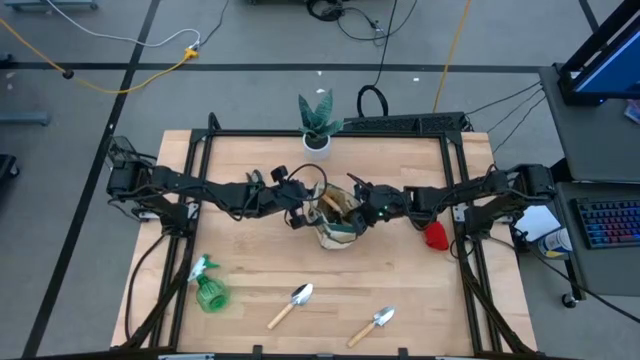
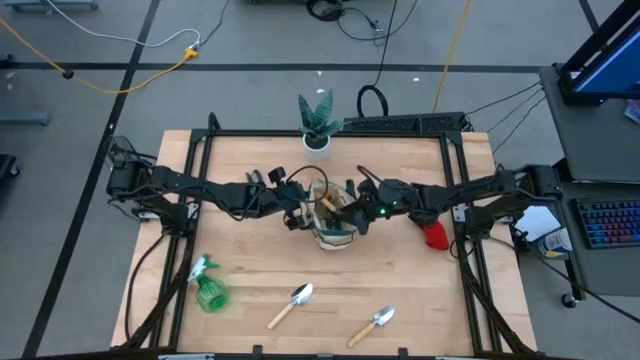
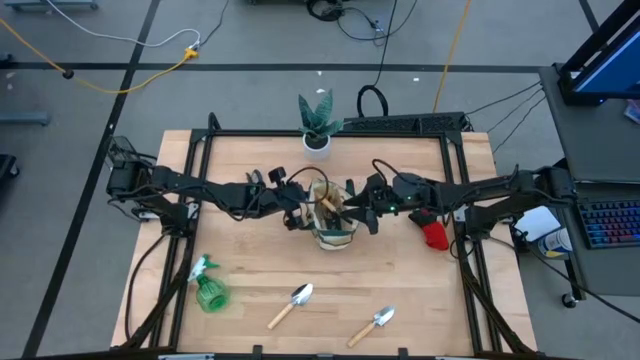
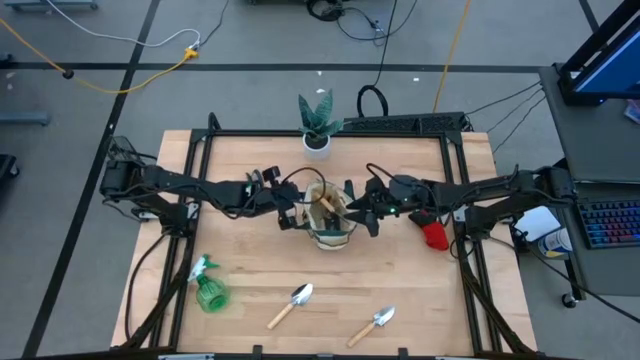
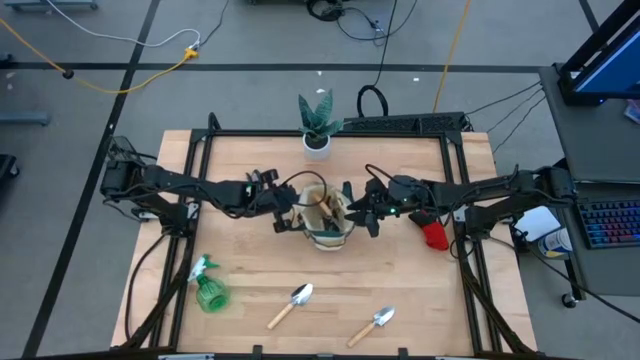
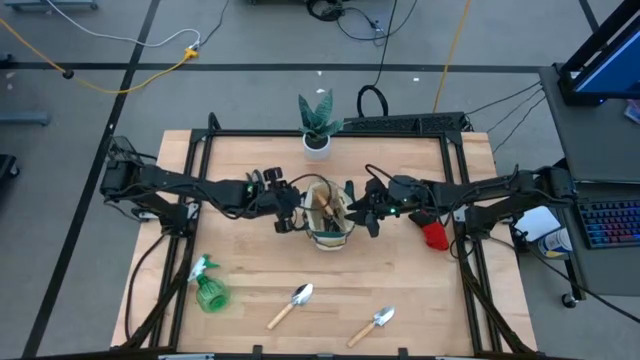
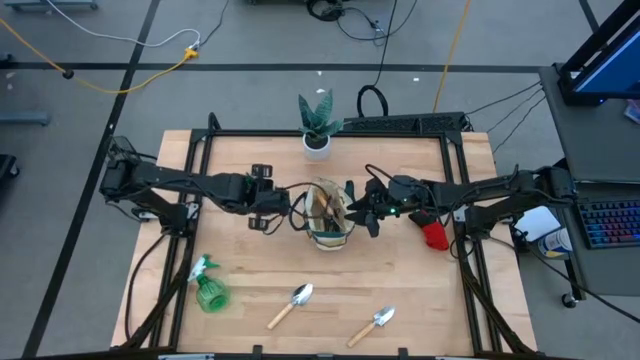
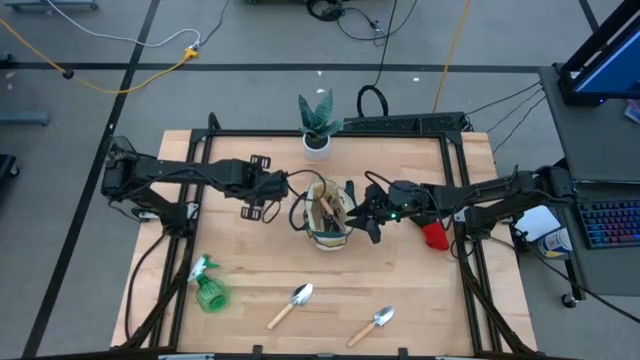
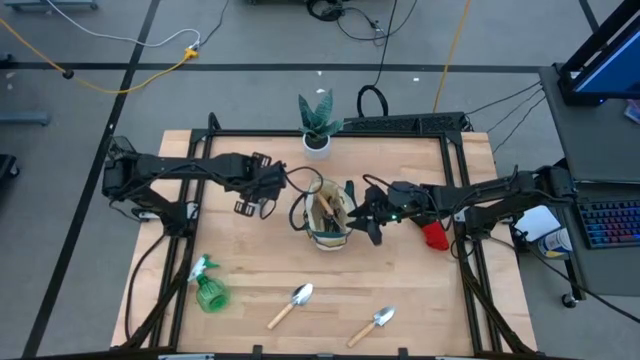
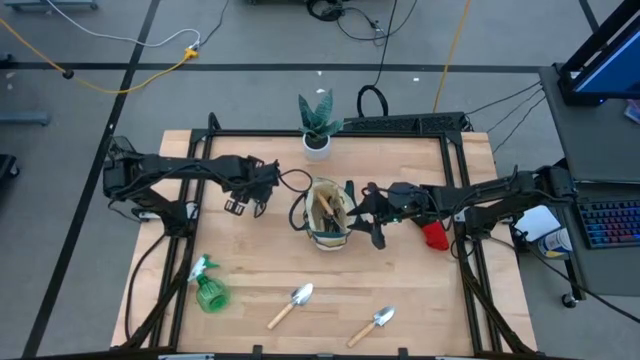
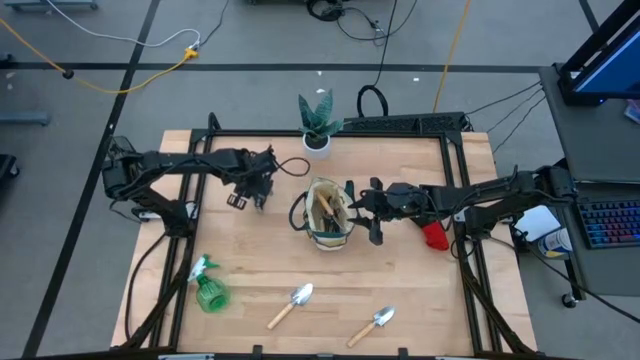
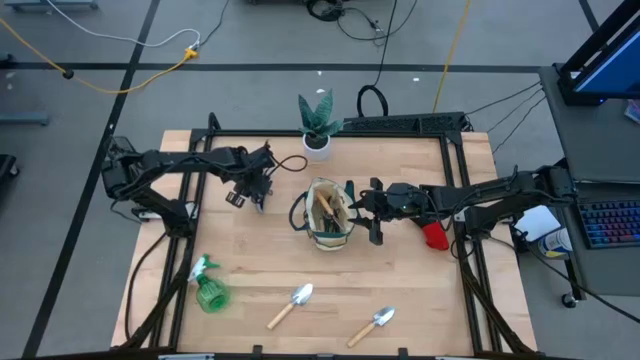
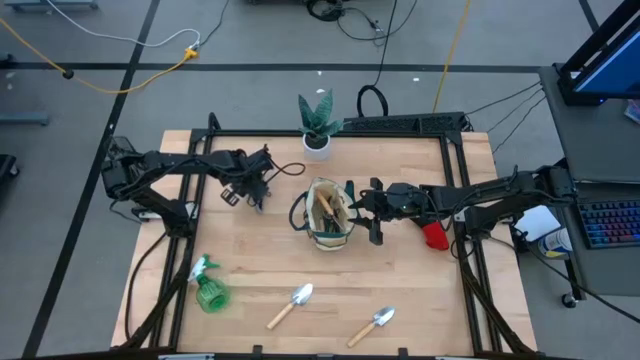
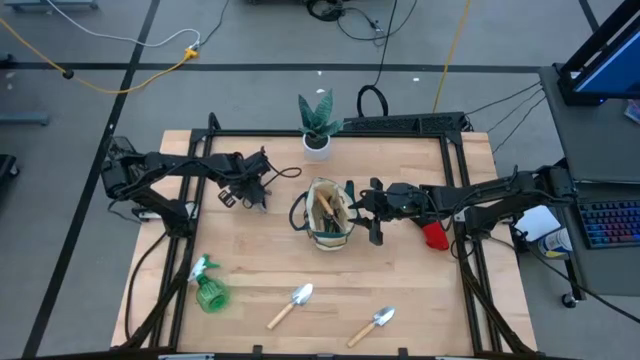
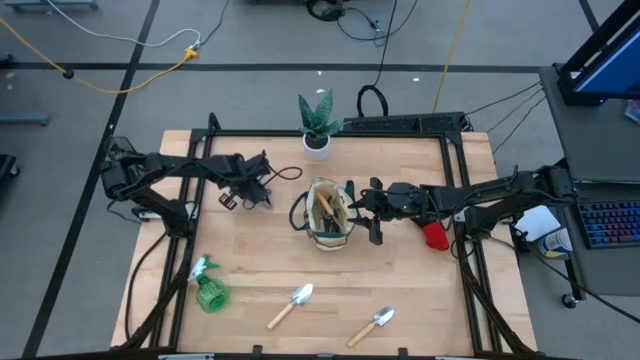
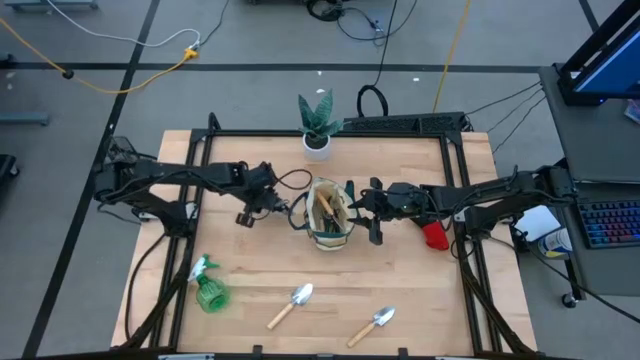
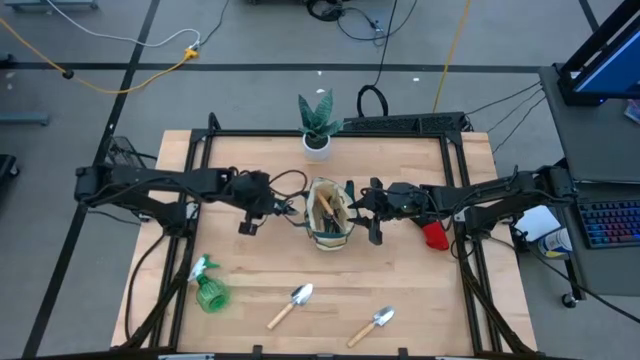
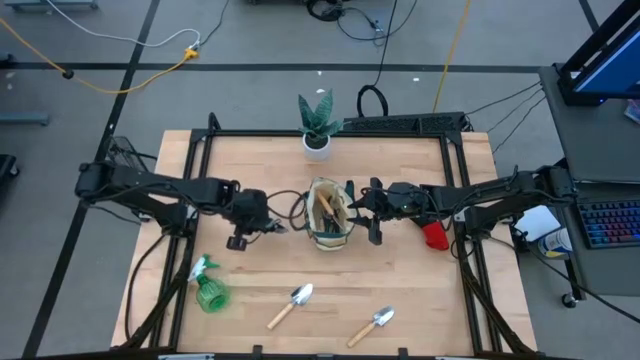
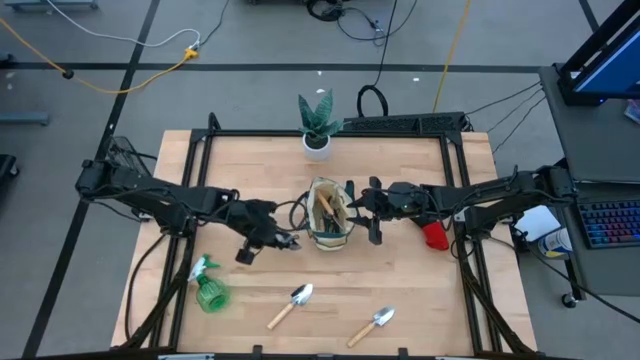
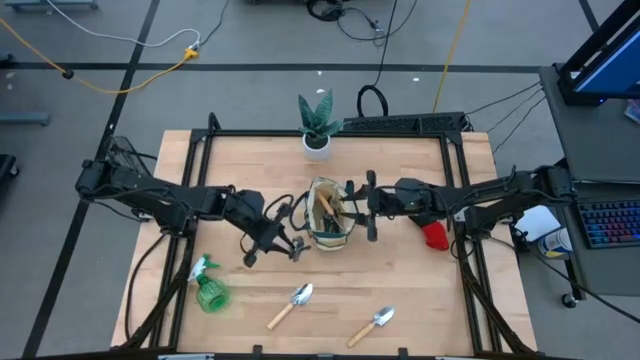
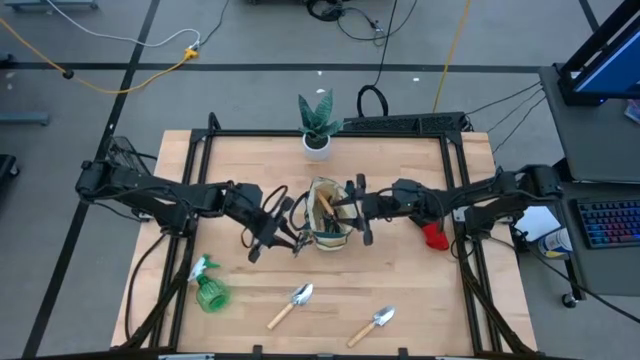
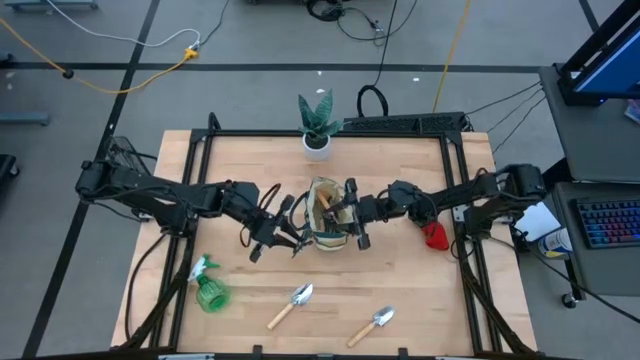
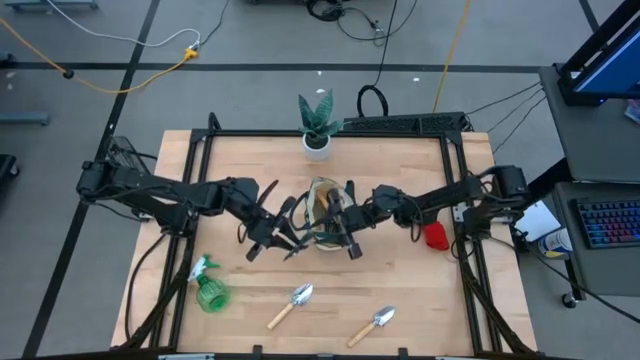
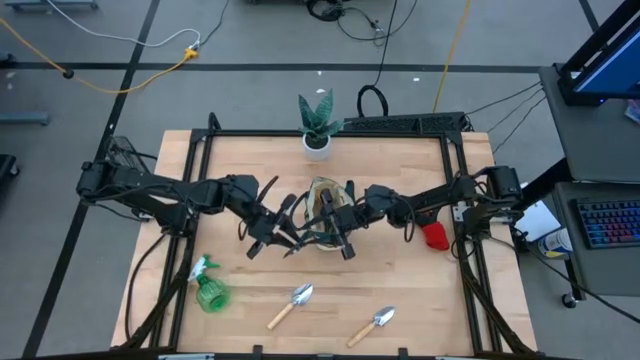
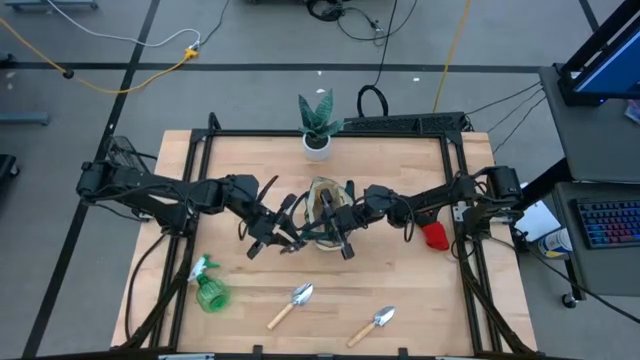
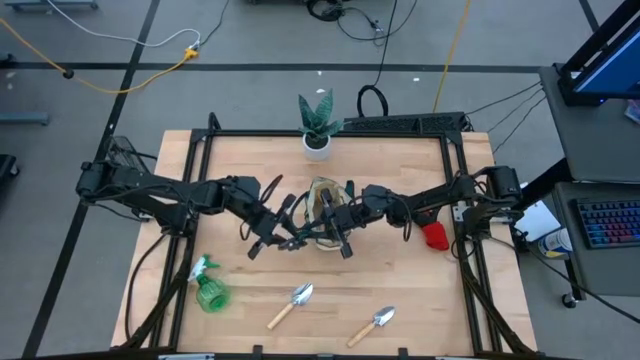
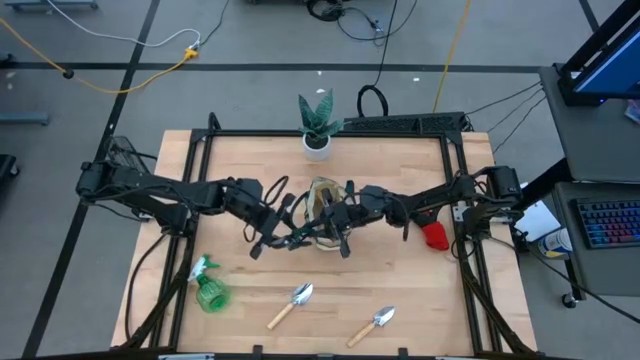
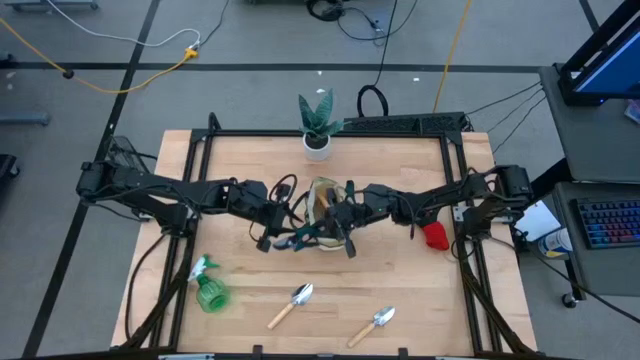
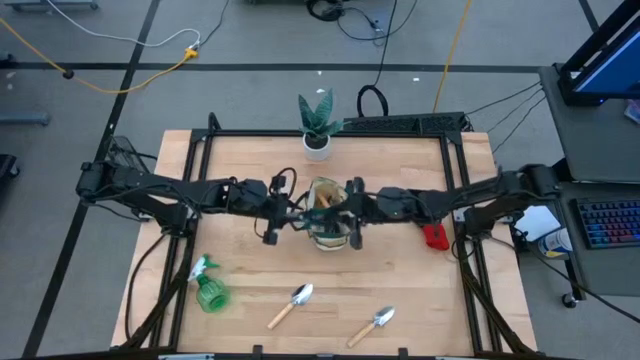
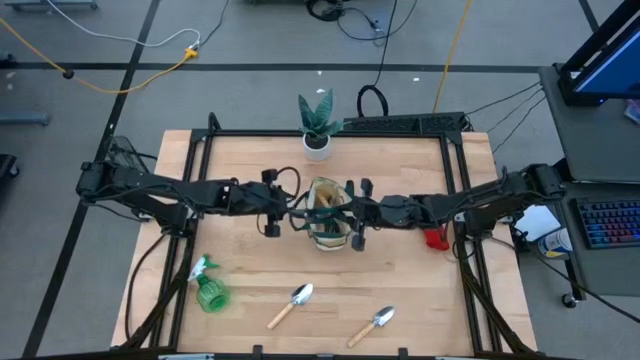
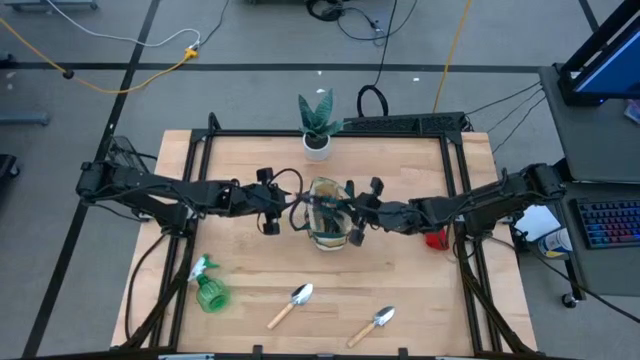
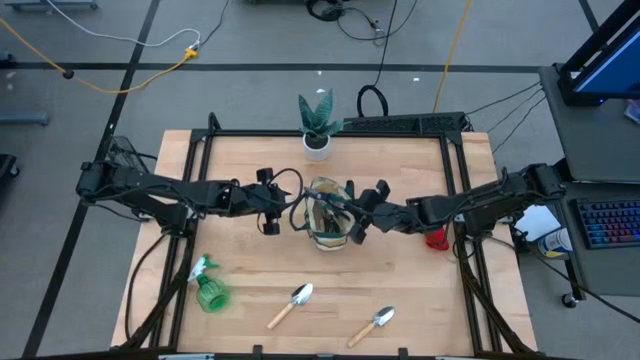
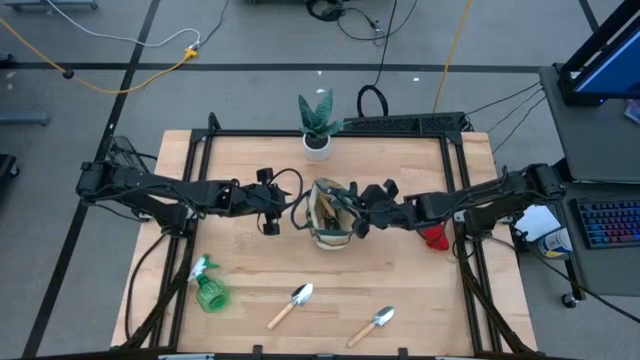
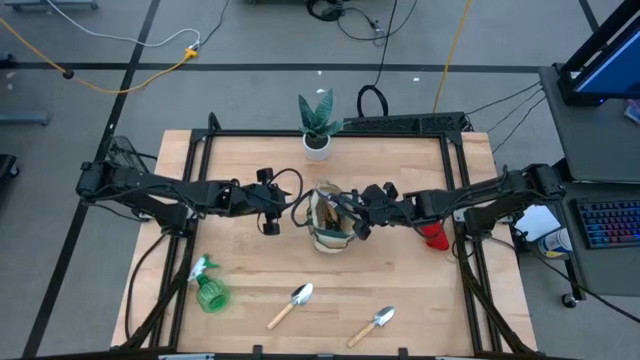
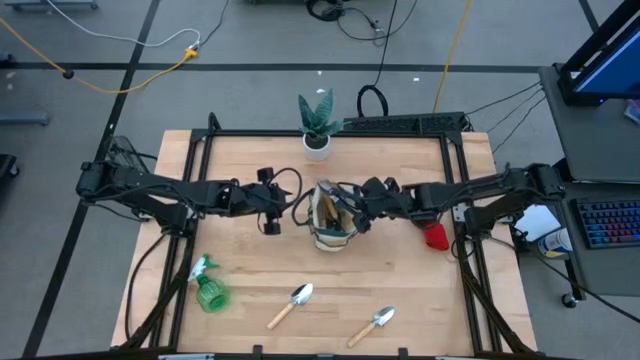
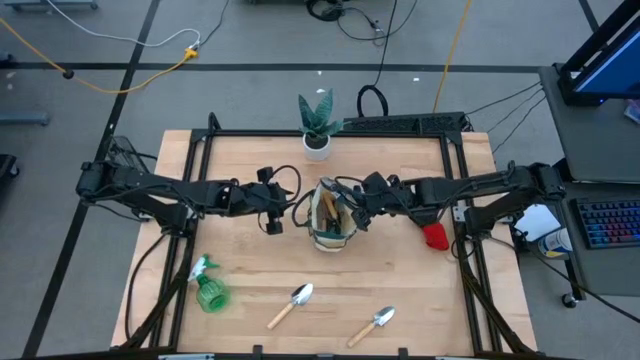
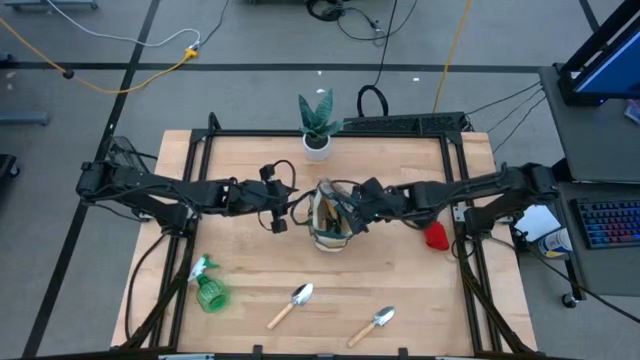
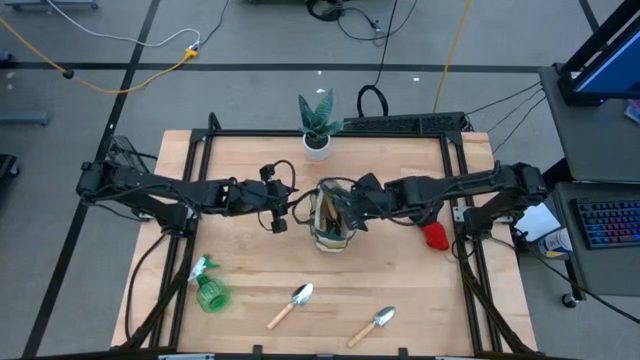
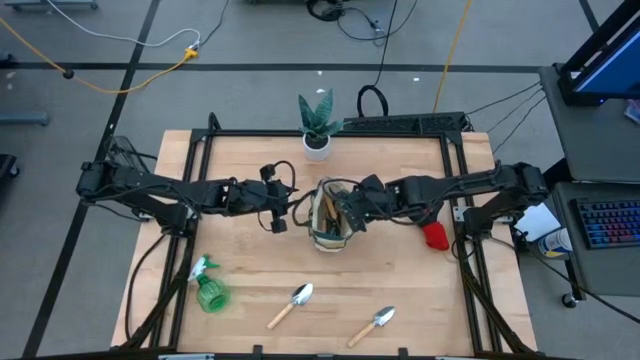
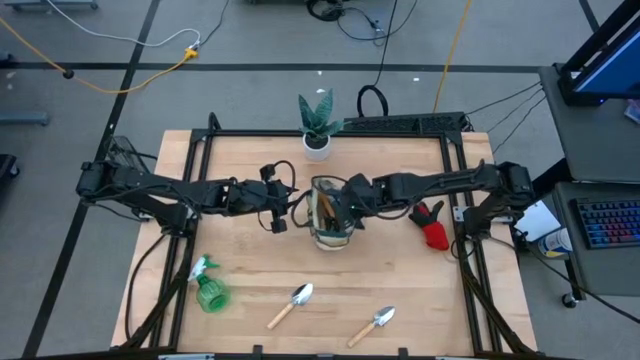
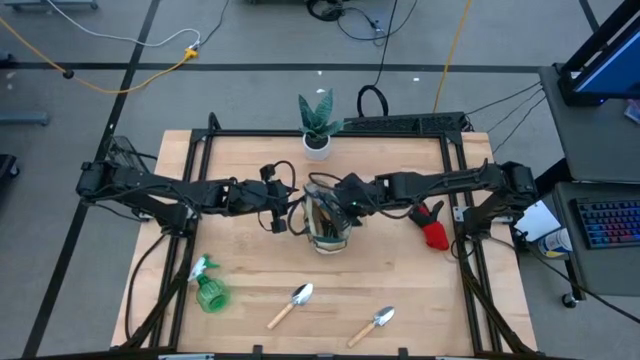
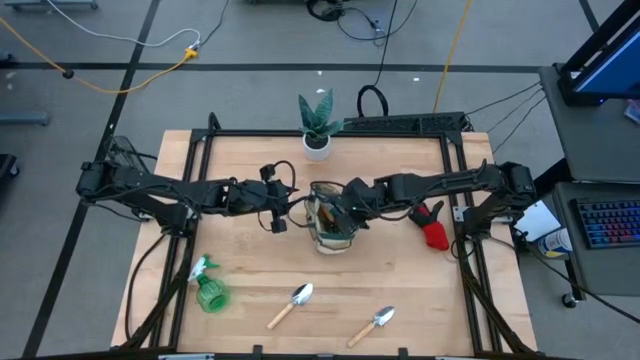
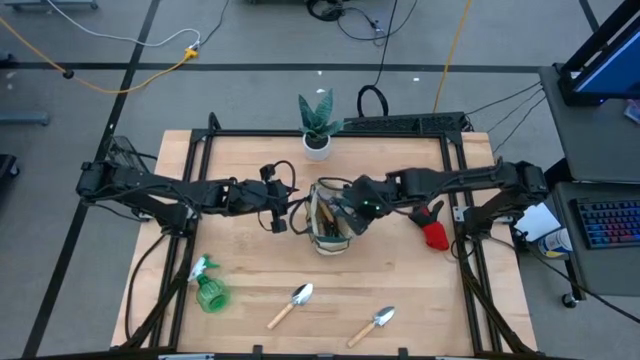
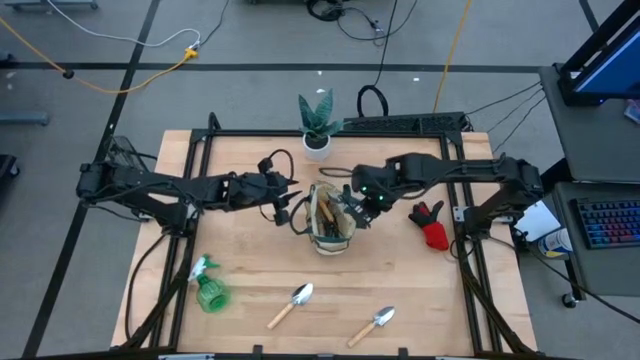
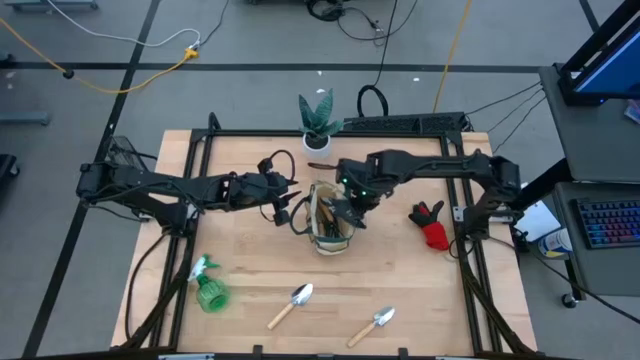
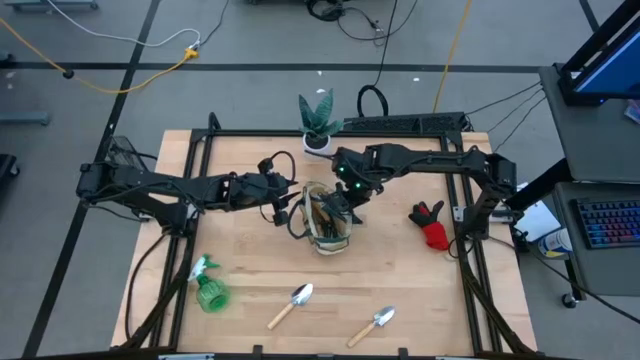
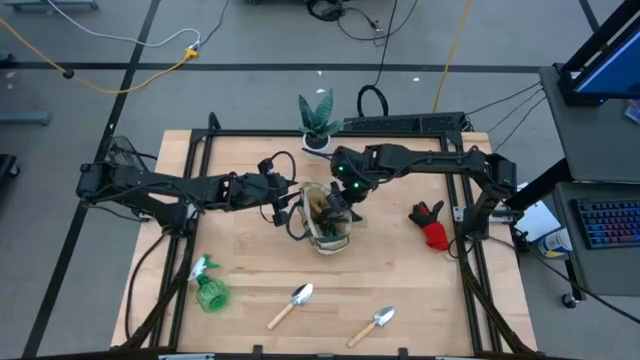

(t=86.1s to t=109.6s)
Task: Pick & Place Garden tools in Gardening bag
Put the green shear scissors into the gardening bag
